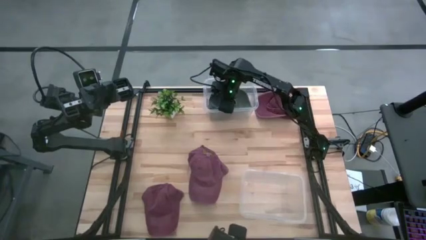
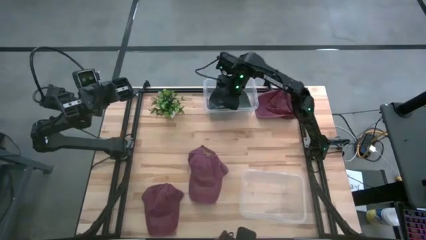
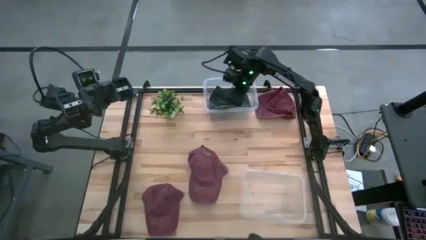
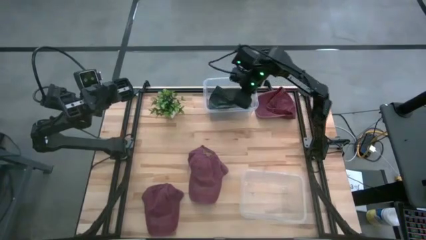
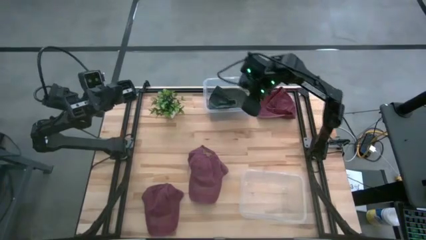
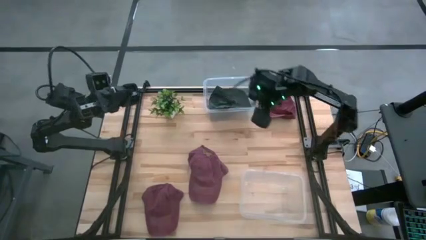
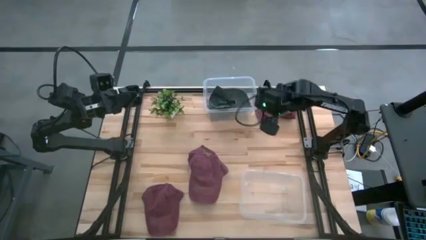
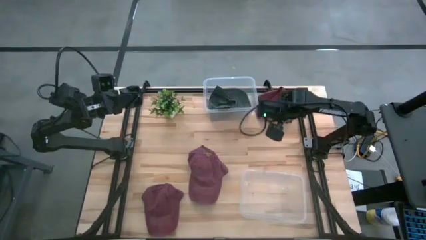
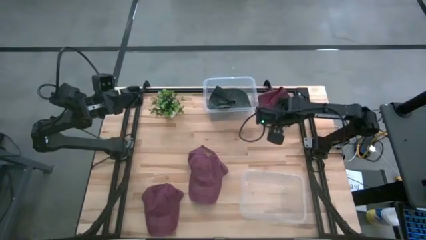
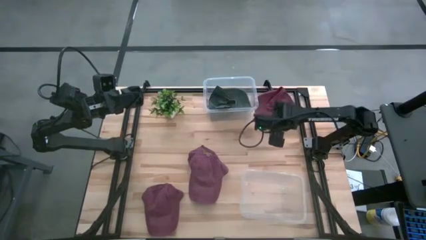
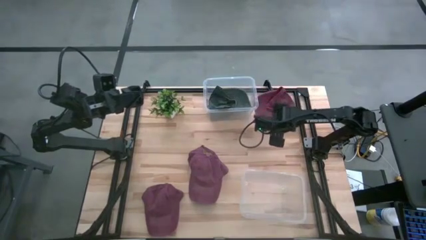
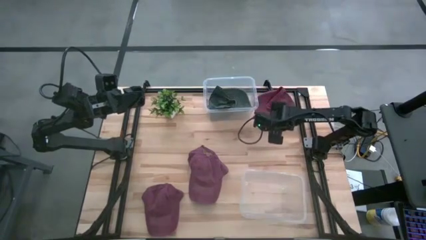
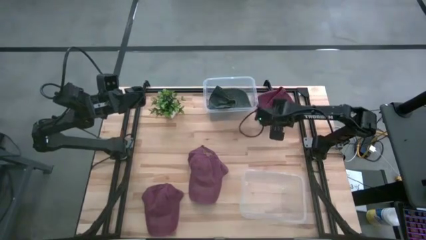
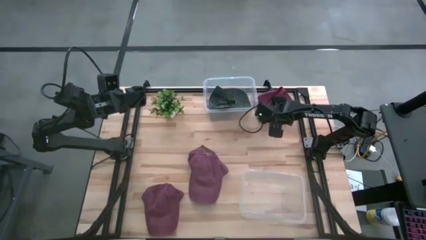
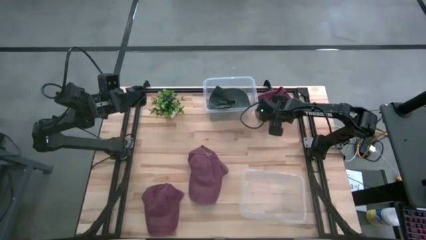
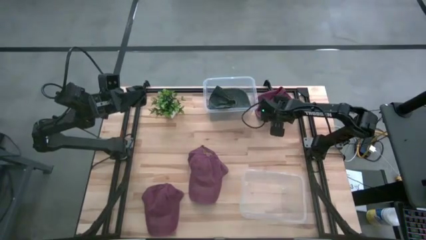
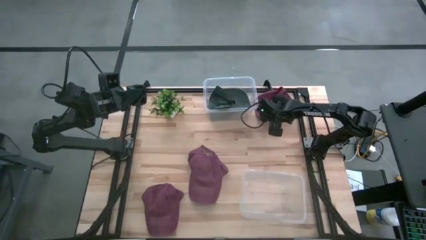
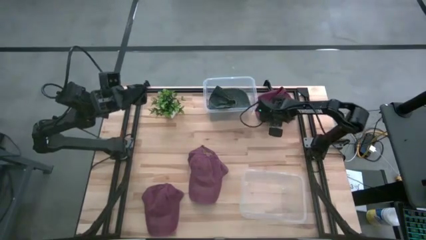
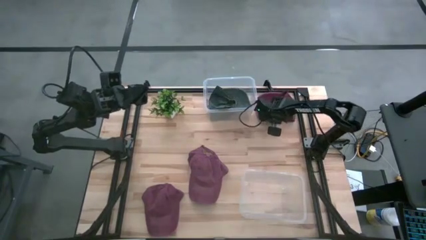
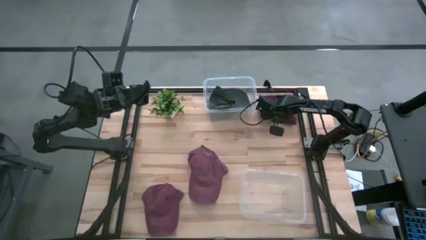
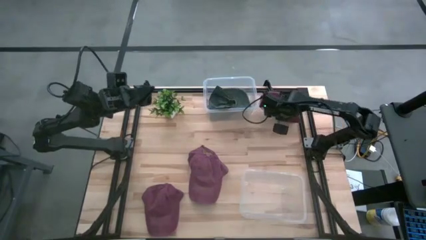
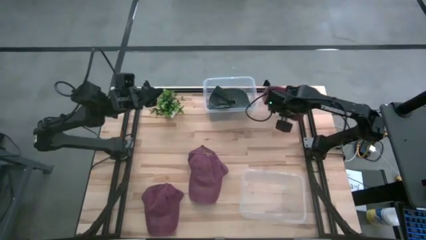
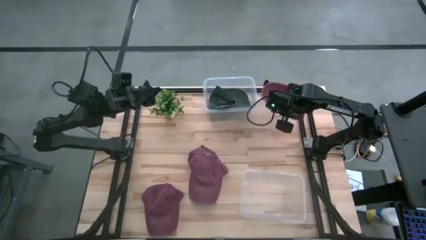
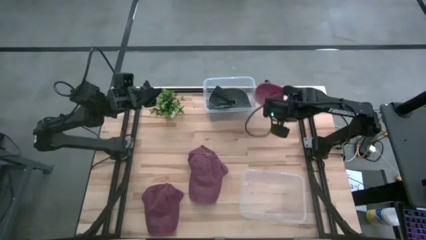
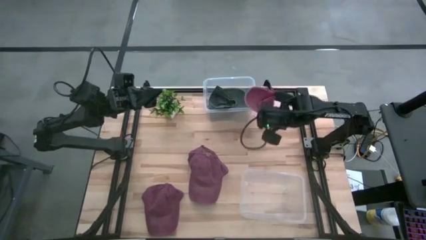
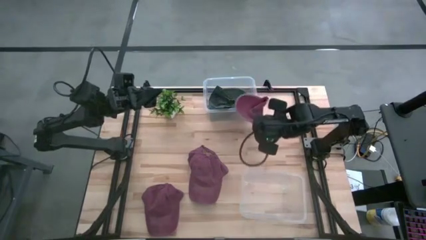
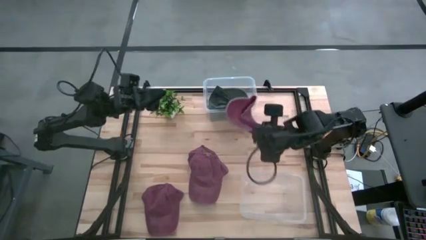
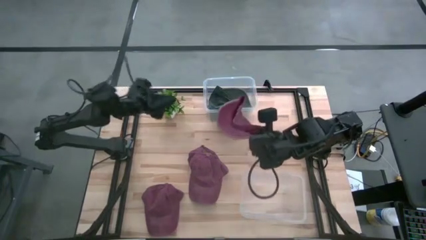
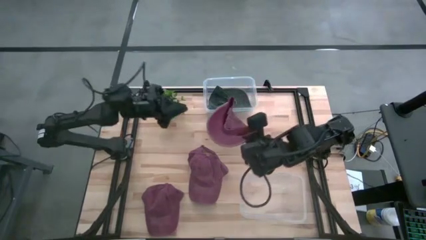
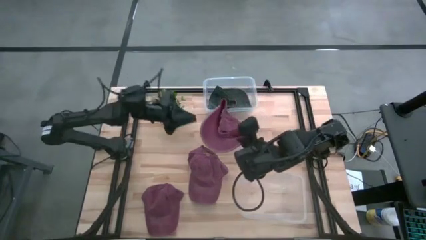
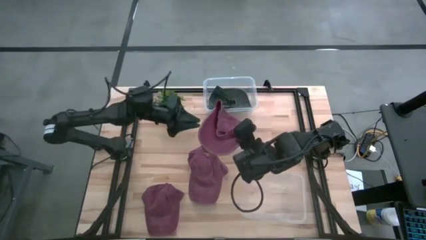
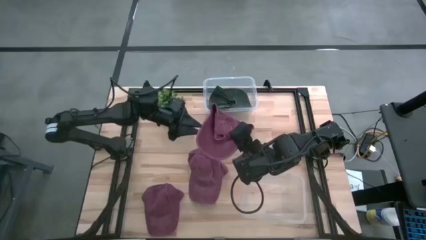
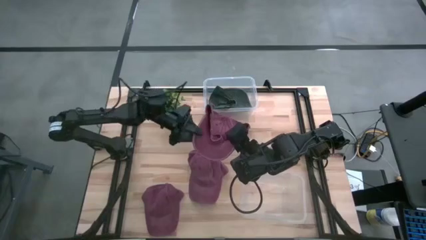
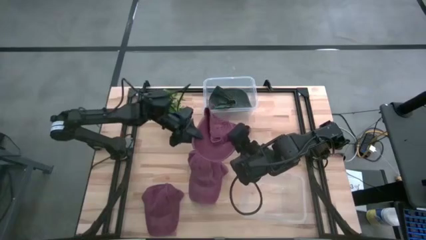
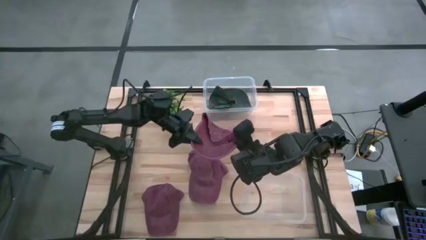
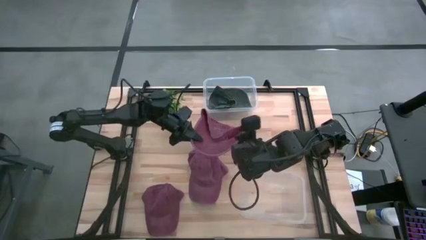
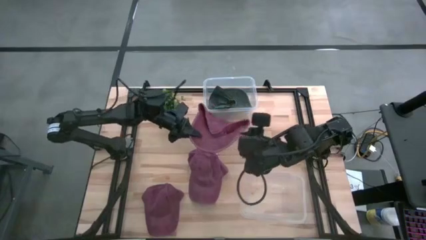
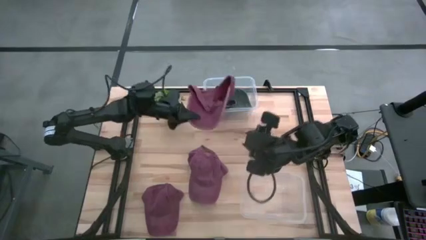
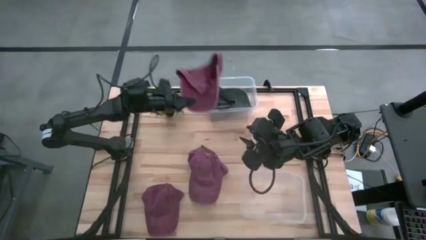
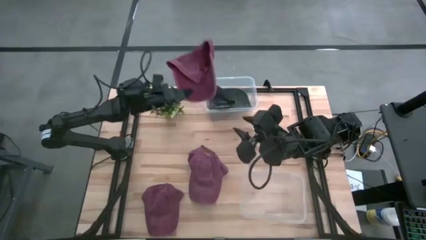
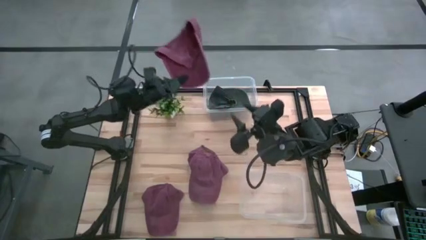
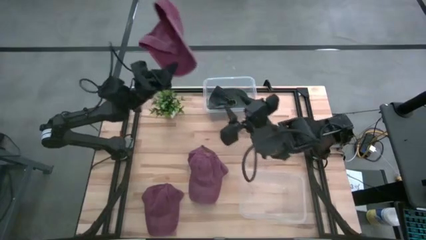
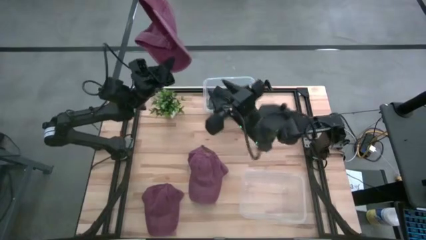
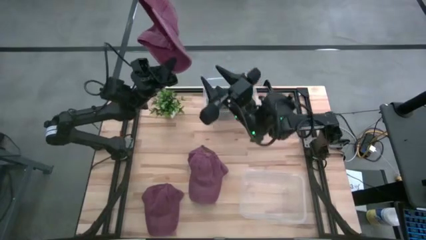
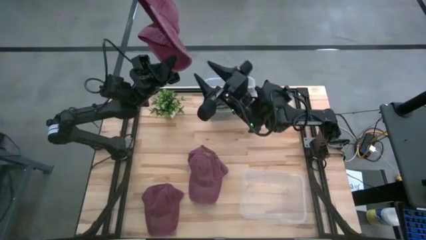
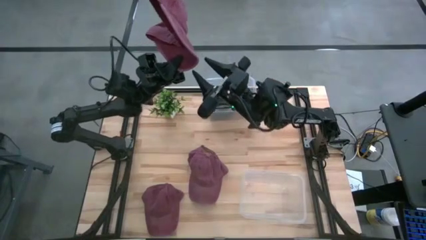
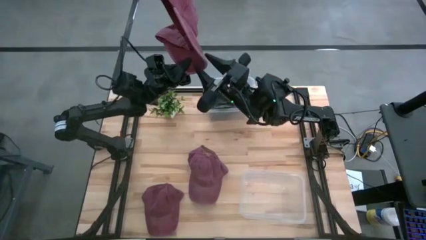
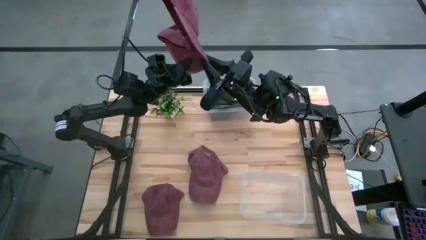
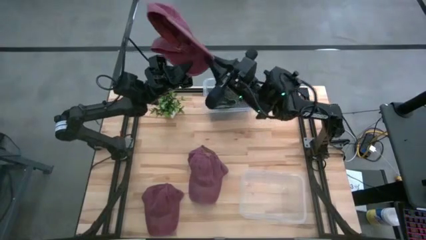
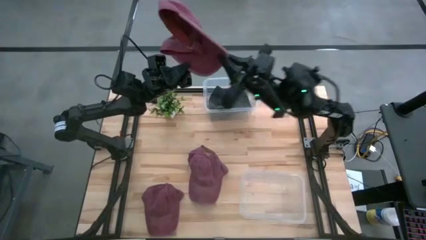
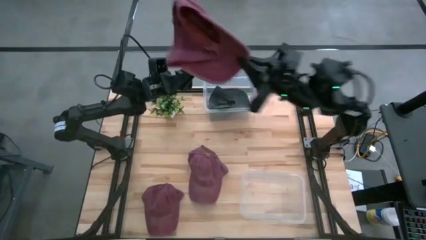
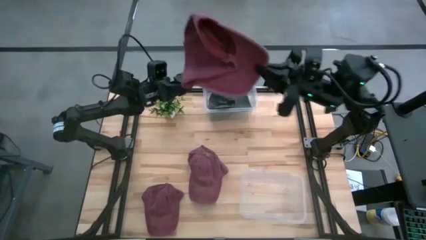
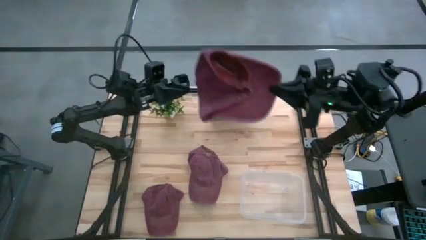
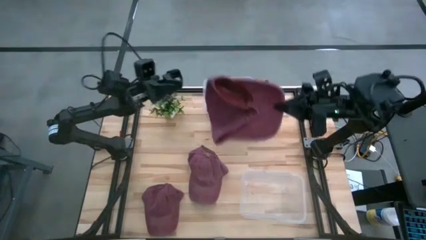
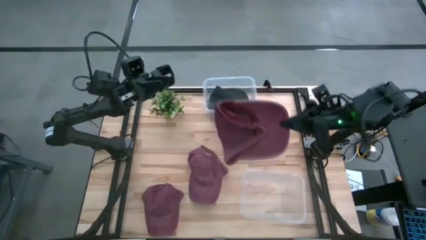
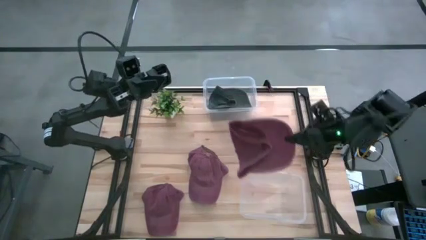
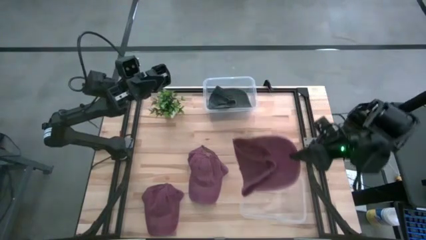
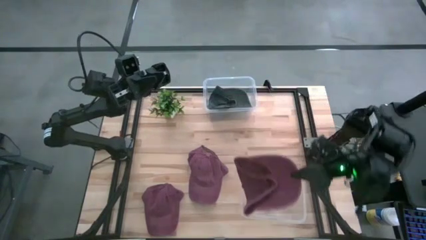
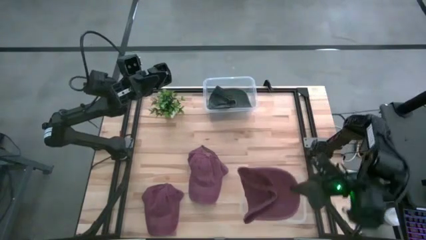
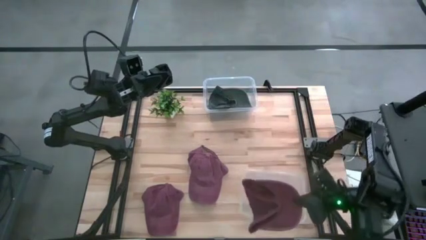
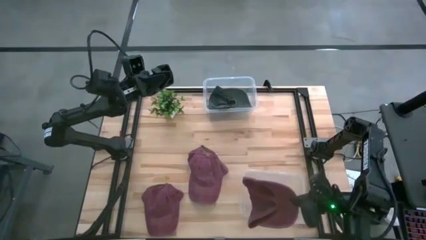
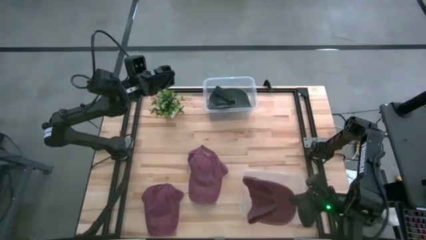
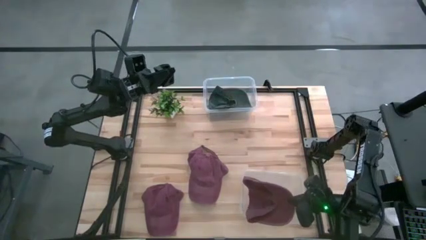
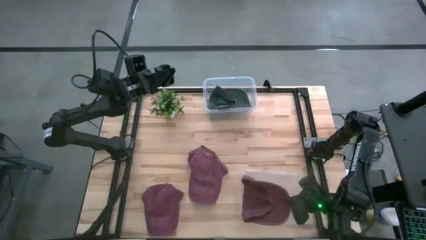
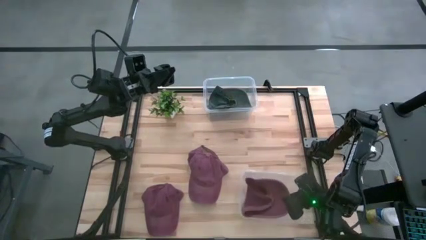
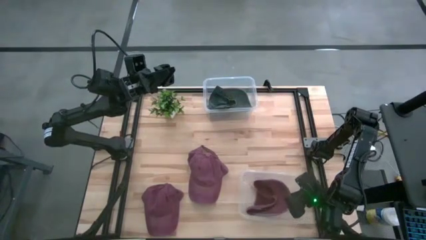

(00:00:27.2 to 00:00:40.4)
Task: Pick & Place hat
Put the maroon cap into the bottom transparent bin
